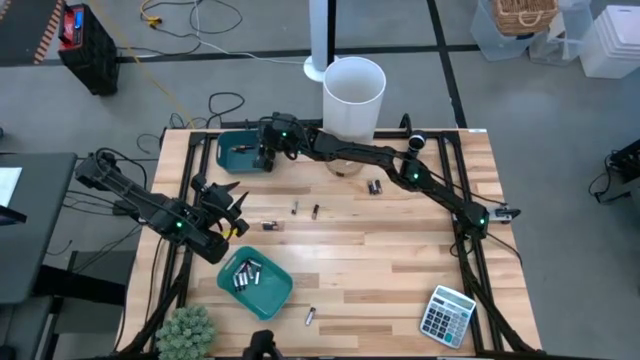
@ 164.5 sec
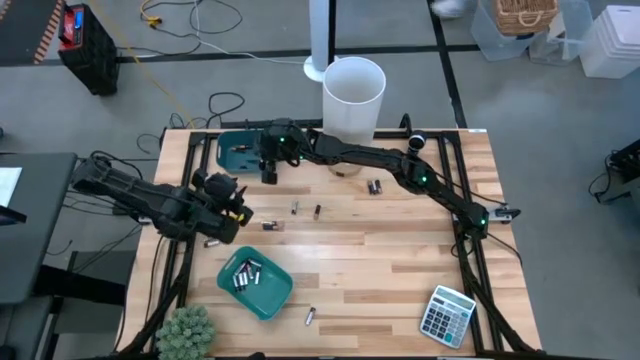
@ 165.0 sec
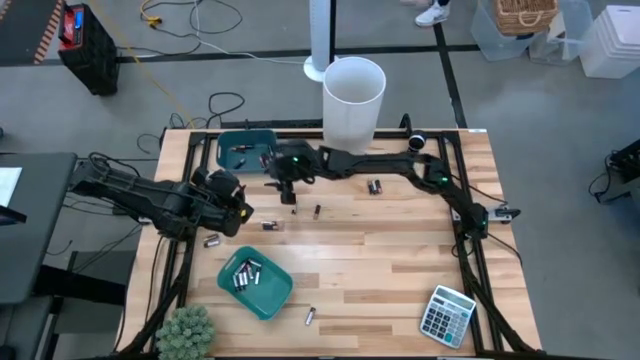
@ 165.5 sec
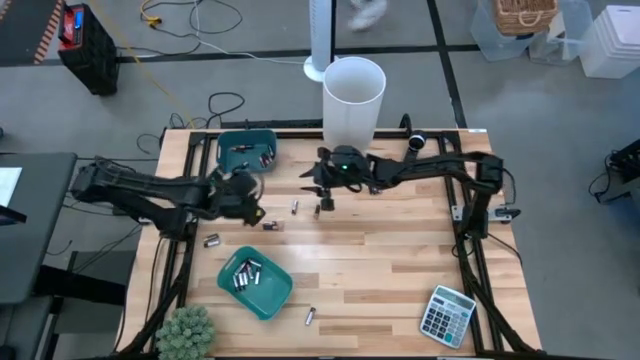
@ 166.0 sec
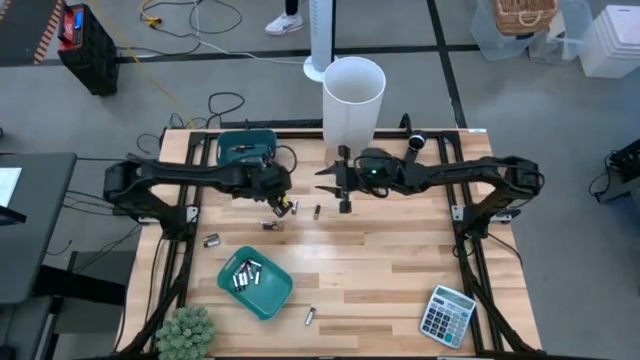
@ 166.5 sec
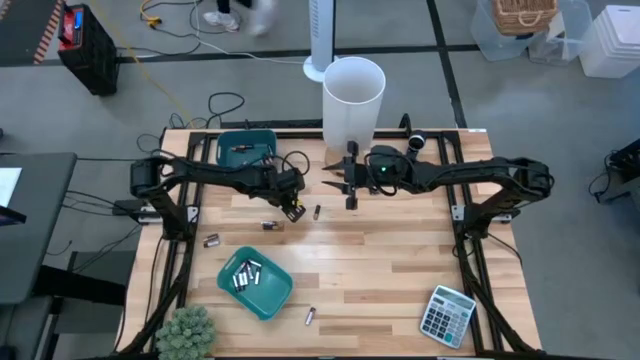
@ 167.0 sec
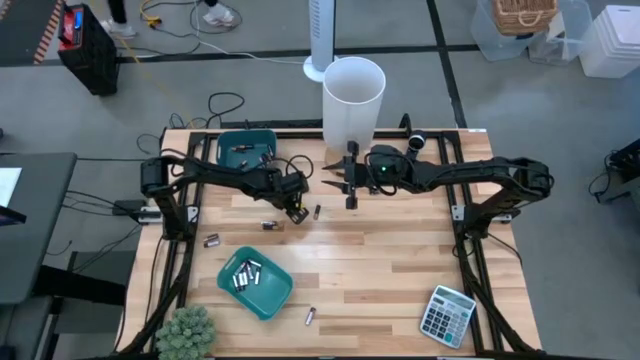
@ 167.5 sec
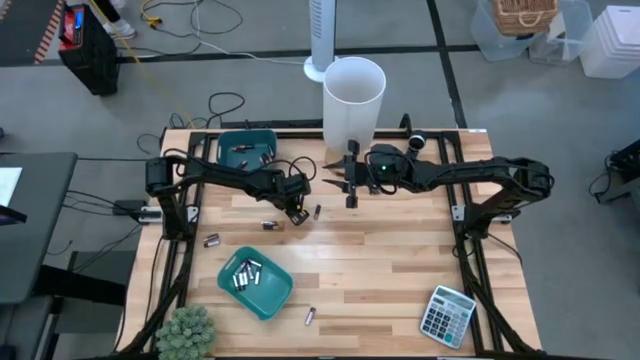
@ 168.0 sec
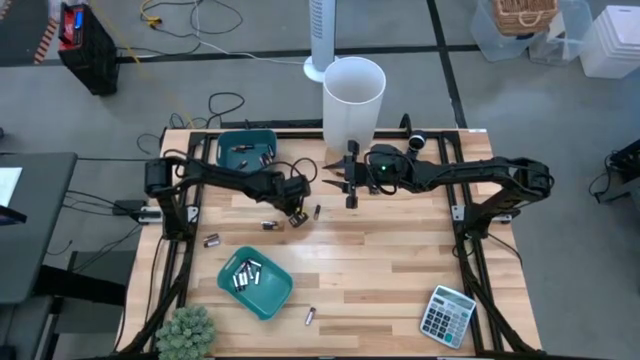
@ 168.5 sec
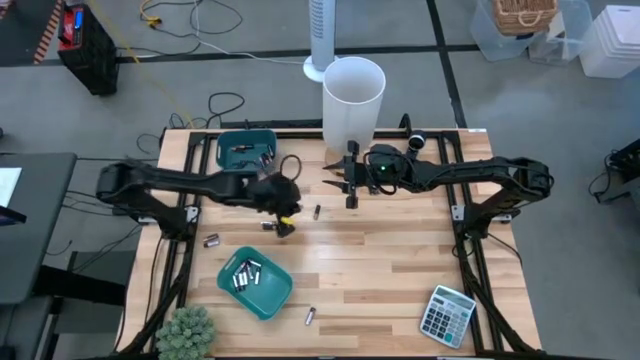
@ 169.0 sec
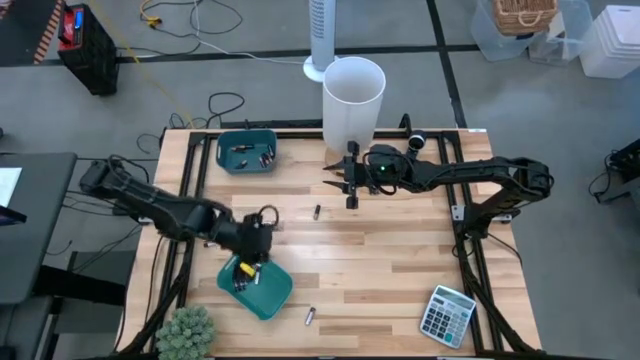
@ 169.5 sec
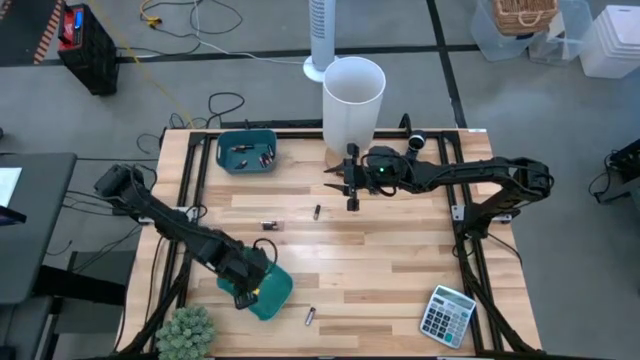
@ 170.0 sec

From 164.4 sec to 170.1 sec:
Task: Sort batteries
Put the silver battery into the green bin

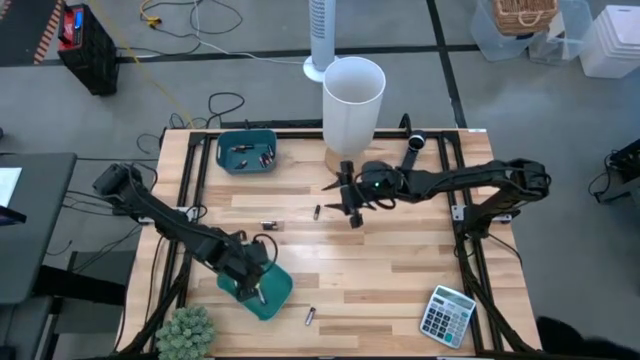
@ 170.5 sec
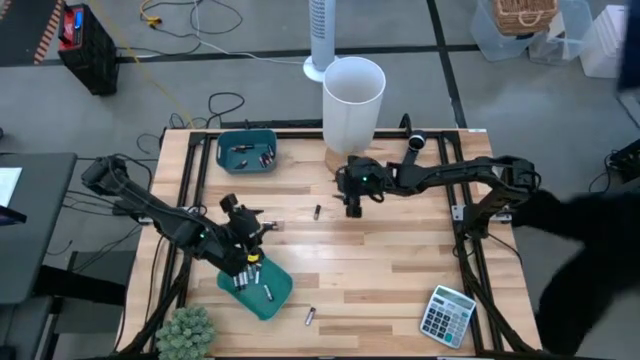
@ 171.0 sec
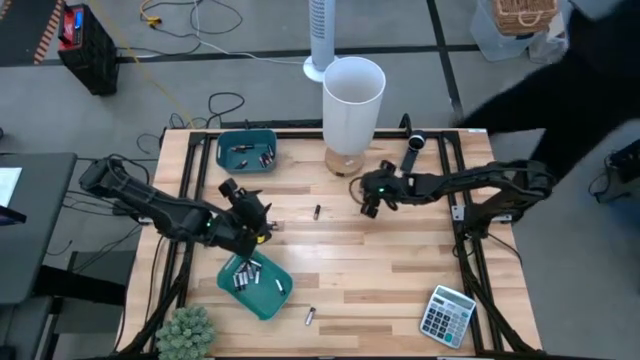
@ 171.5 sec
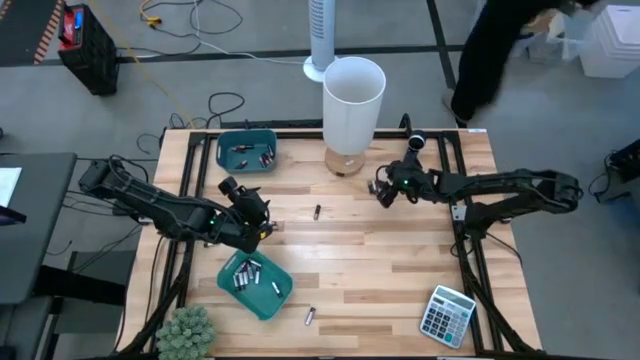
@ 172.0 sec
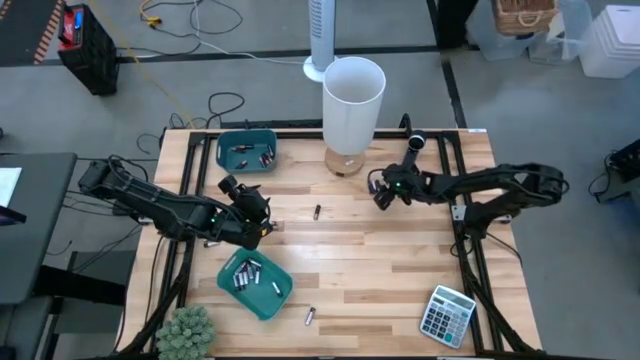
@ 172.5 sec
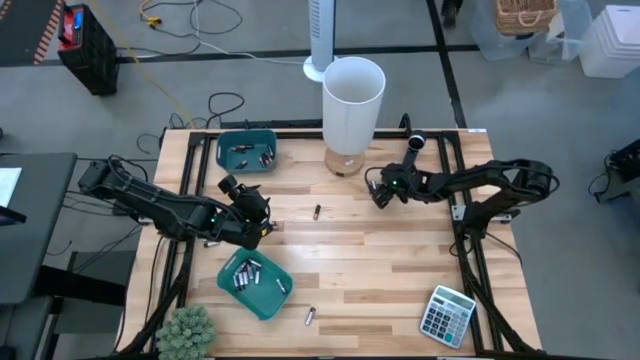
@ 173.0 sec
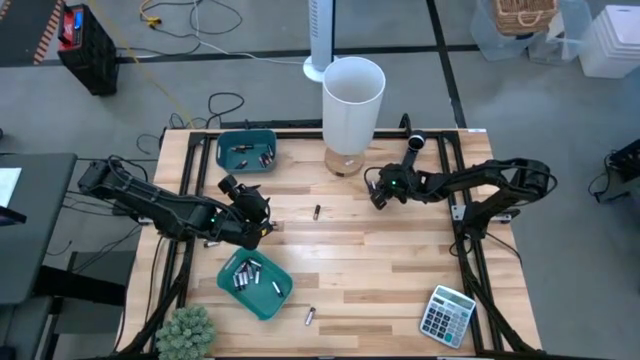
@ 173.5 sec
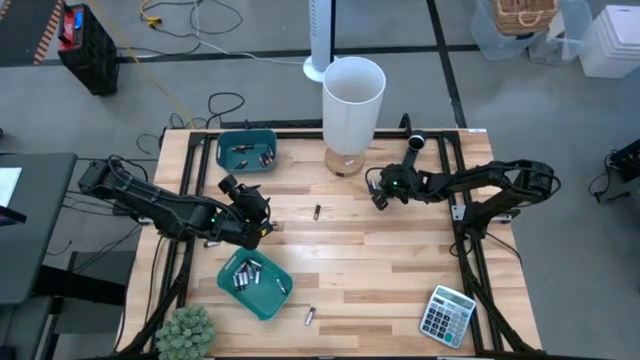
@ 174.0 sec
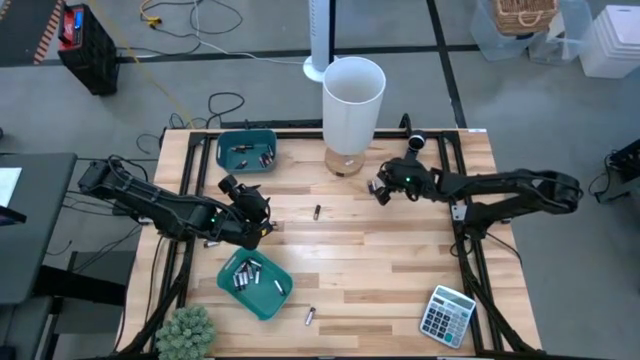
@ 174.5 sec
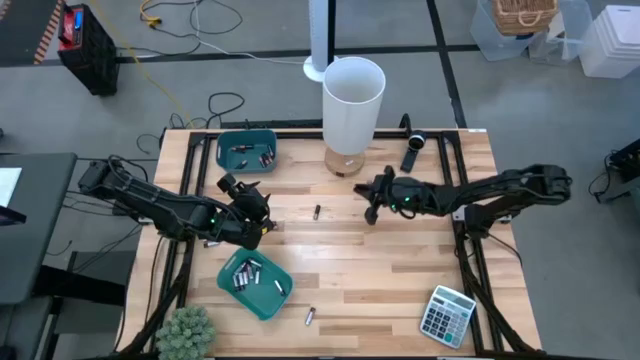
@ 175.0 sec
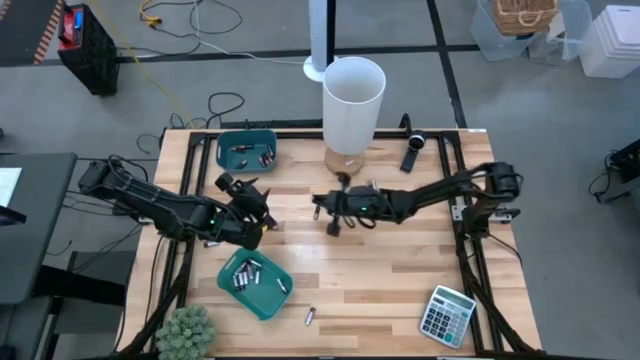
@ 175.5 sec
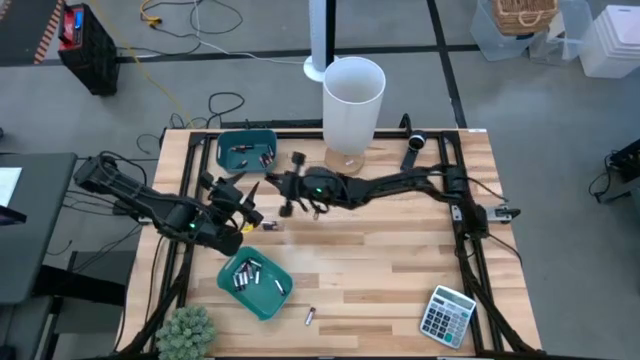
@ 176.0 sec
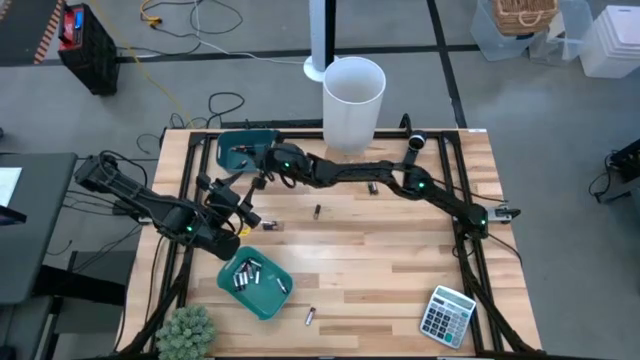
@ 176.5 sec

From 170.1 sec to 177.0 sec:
Put the black battery into the blue bin

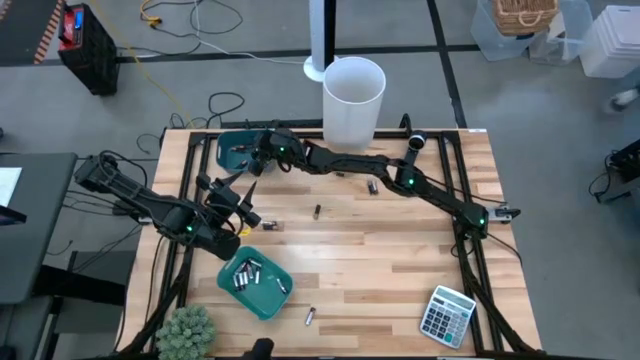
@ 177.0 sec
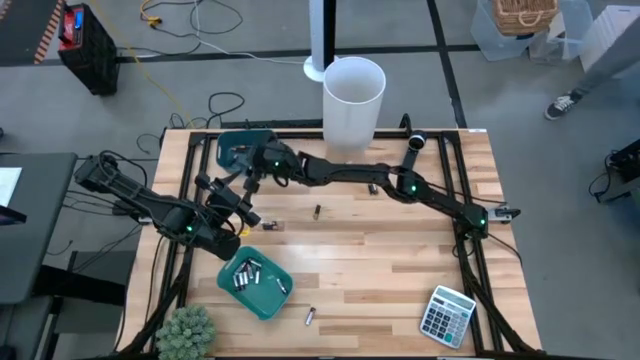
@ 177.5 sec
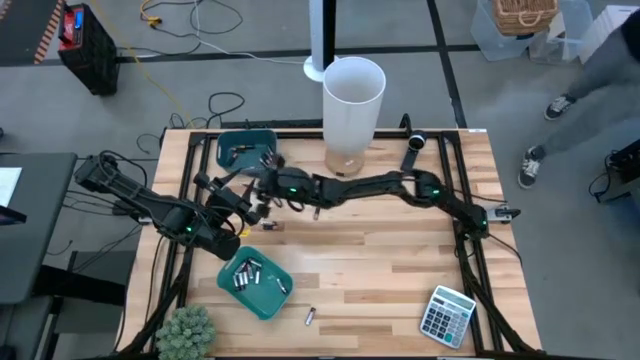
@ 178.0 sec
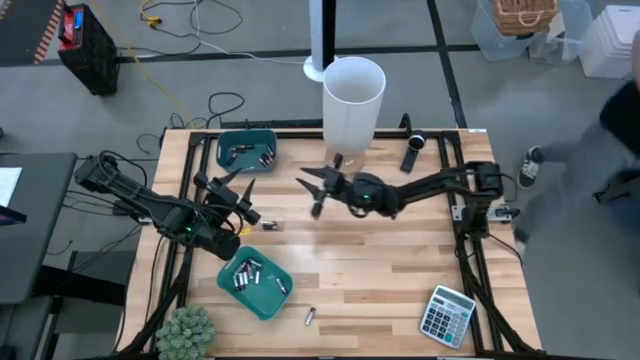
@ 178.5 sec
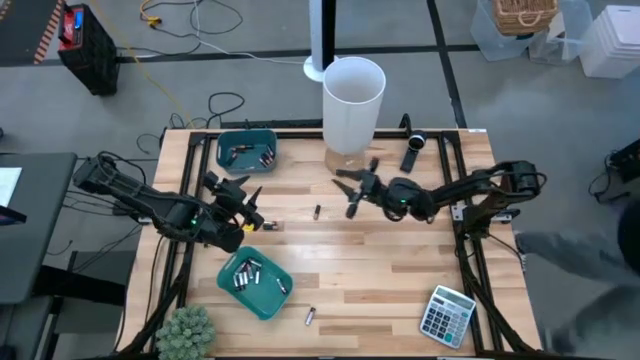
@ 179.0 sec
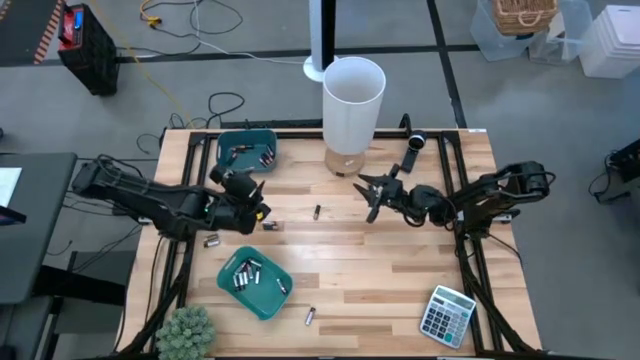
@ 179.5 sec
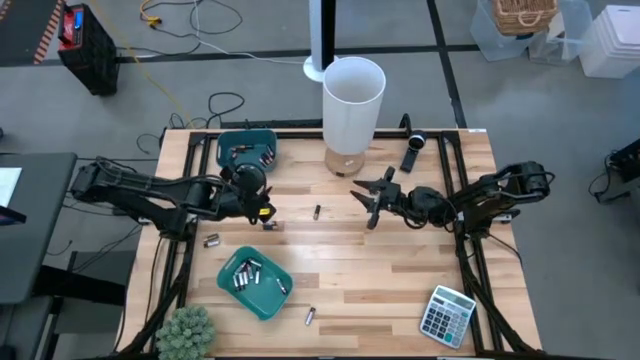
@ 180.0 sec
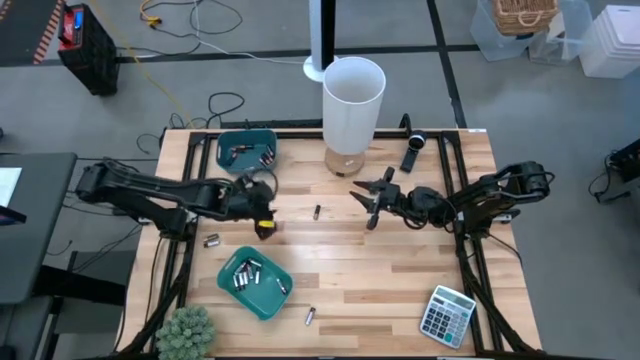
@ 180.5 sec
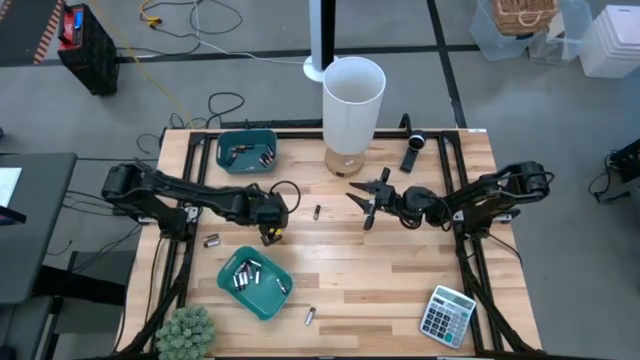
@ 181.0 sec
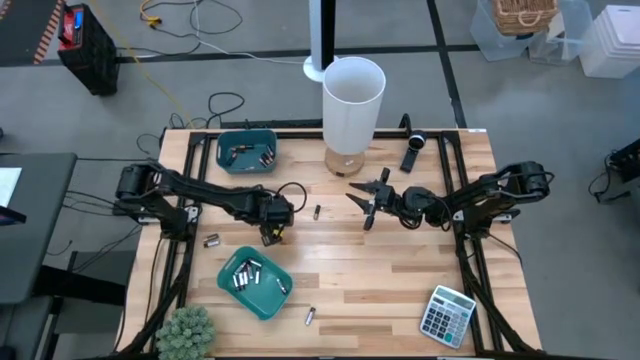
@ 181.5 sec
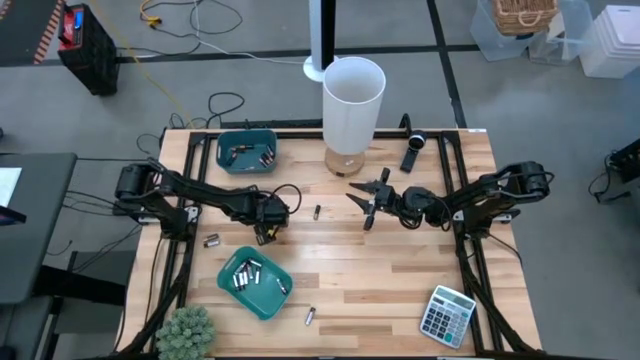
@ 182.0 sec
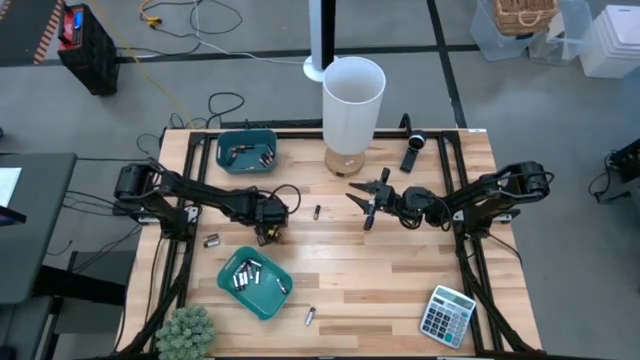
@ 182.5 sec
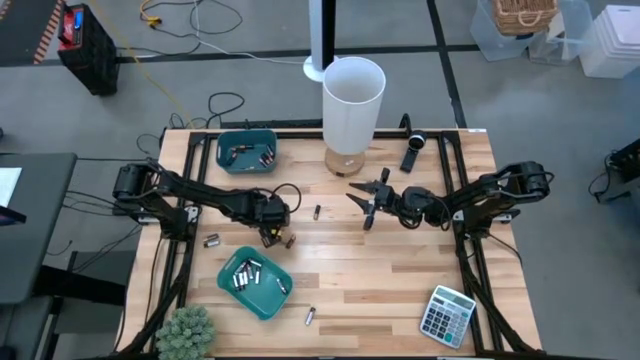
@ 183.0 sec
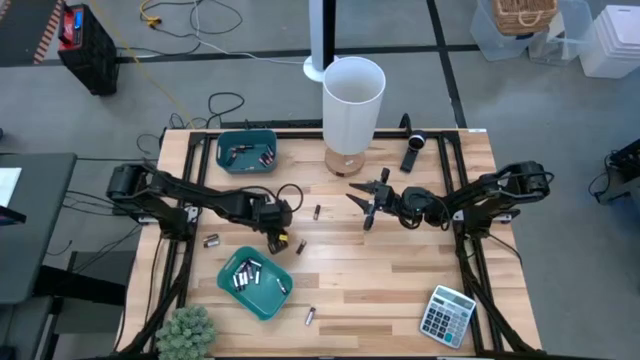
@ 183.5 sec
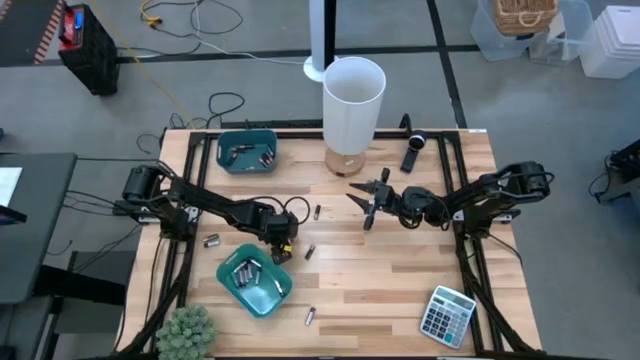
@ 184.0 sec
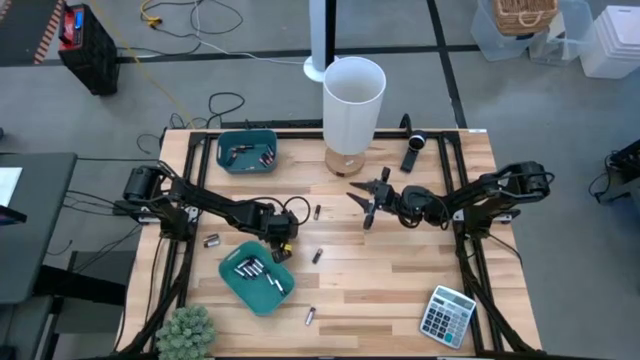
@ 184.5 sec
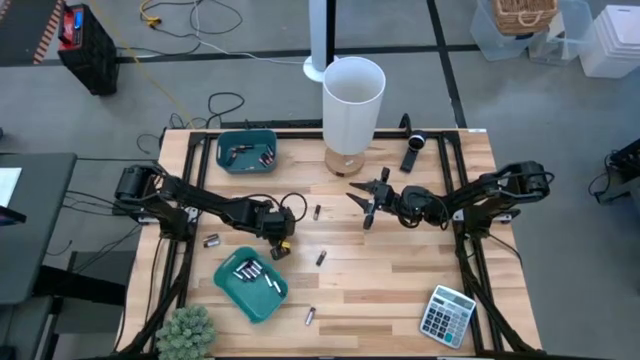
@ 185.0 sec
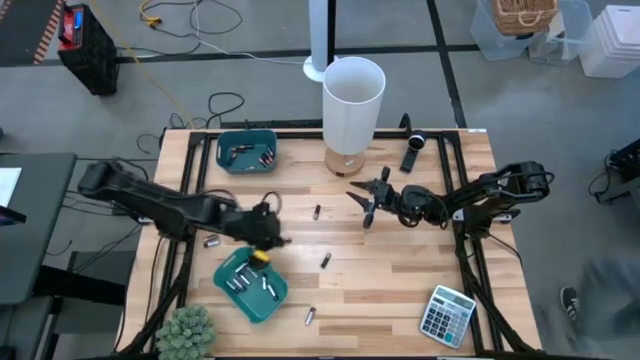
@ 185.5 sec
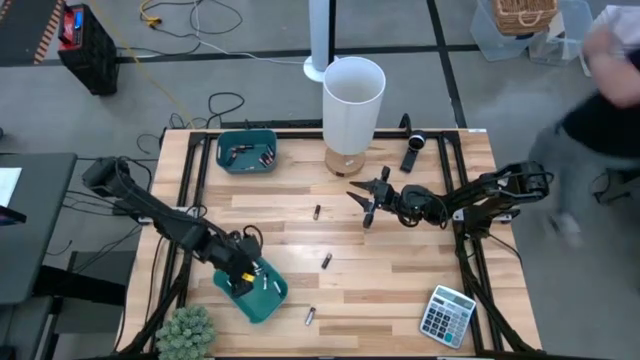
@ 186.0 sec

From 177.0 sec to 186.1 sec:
Put the silver battery into the green bin
